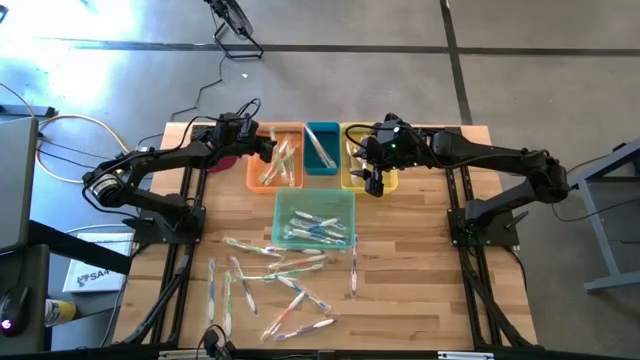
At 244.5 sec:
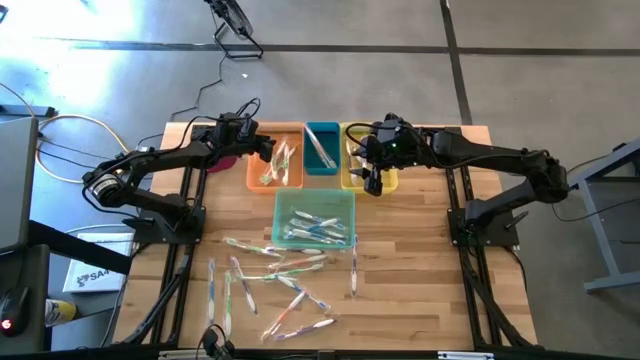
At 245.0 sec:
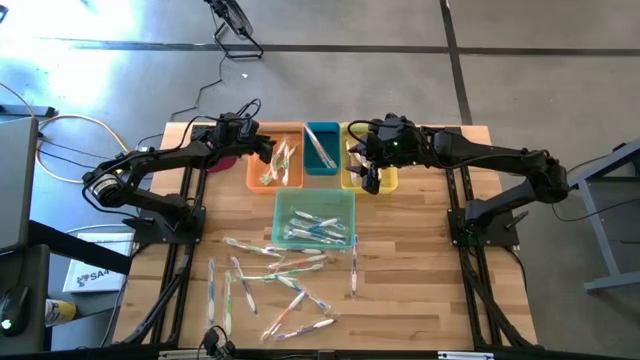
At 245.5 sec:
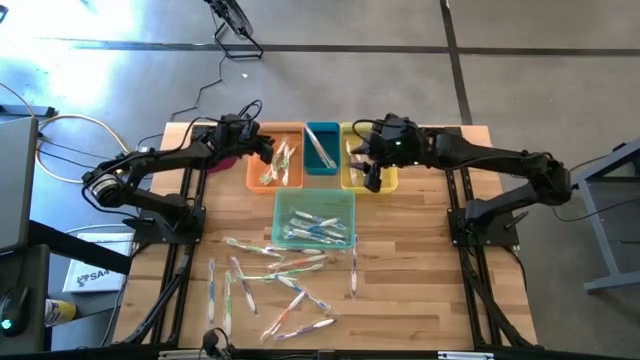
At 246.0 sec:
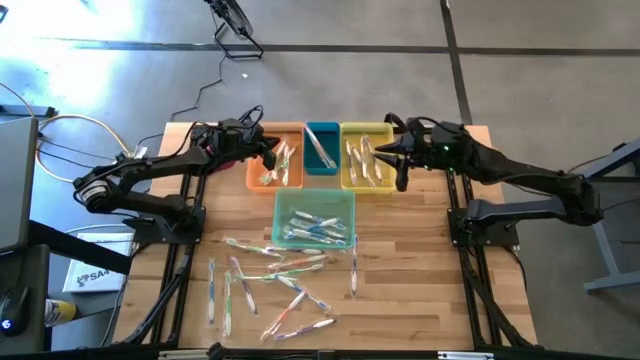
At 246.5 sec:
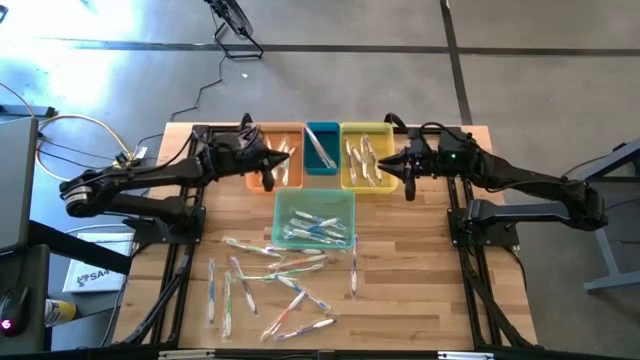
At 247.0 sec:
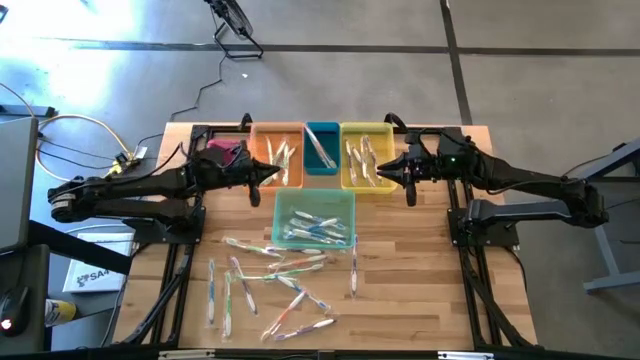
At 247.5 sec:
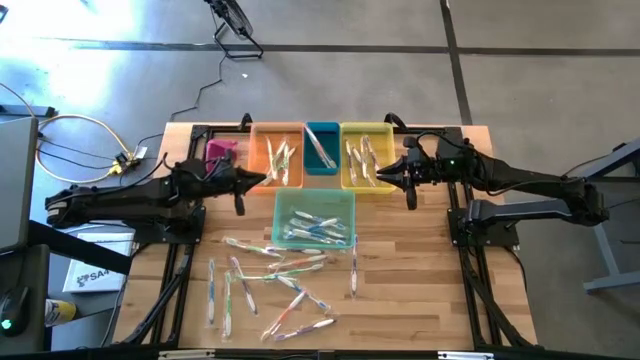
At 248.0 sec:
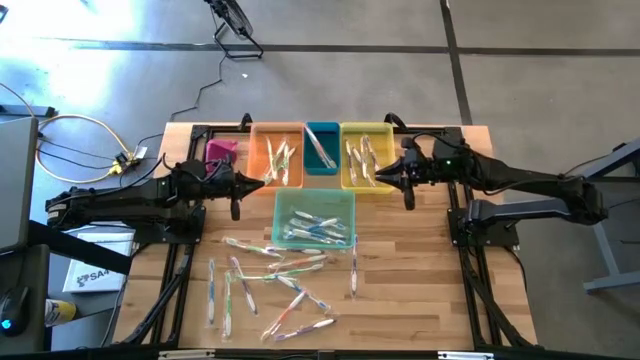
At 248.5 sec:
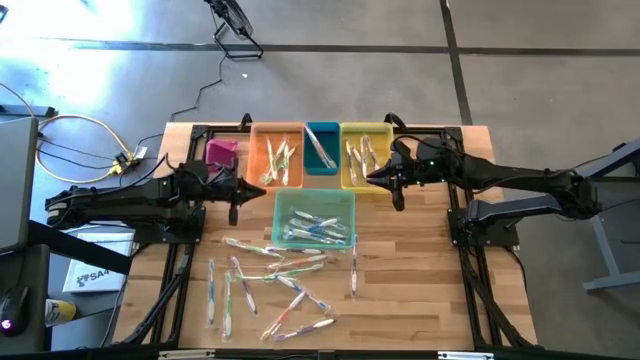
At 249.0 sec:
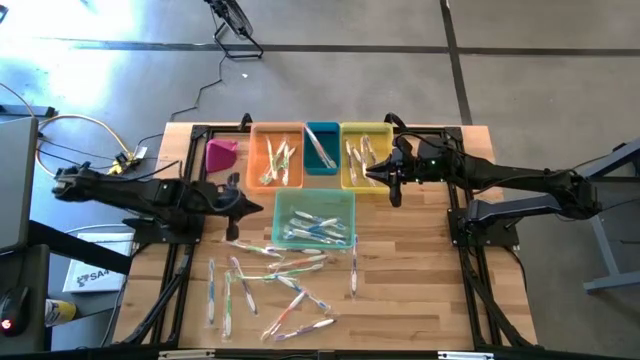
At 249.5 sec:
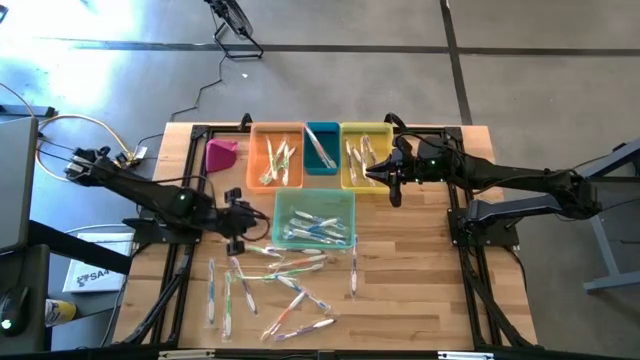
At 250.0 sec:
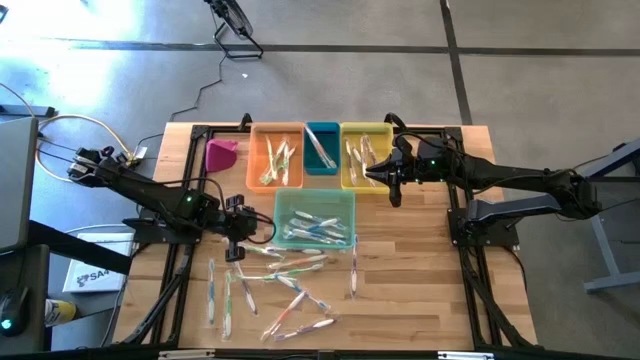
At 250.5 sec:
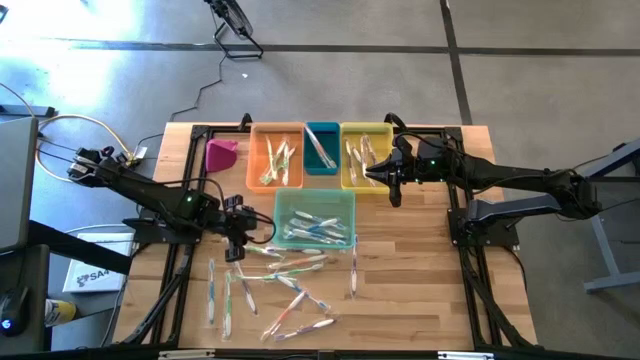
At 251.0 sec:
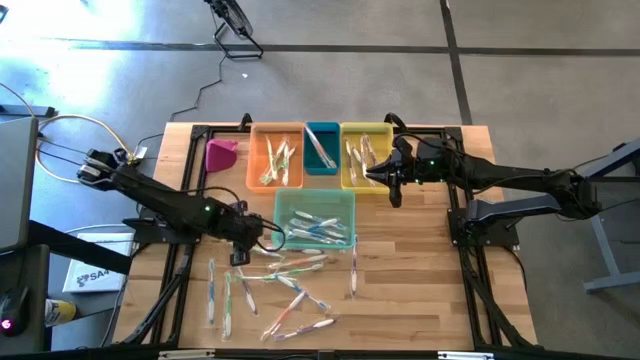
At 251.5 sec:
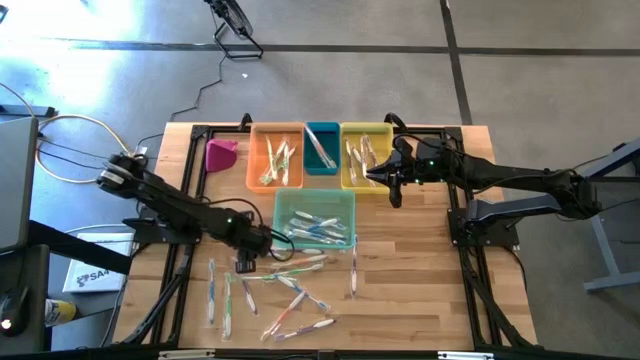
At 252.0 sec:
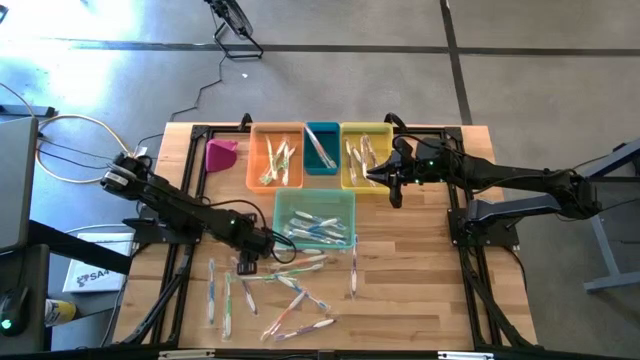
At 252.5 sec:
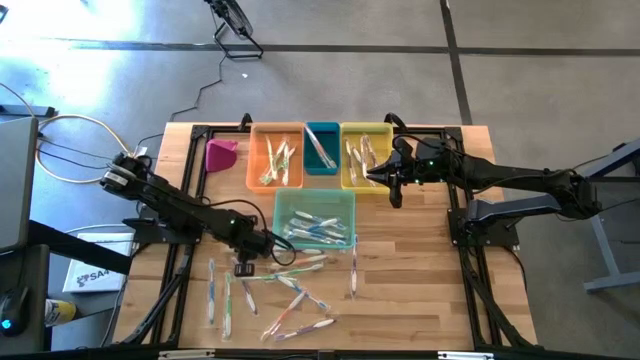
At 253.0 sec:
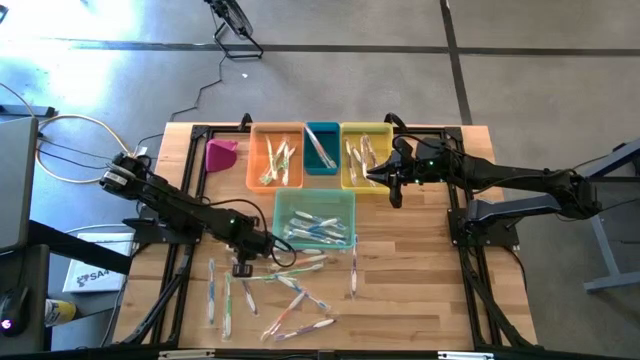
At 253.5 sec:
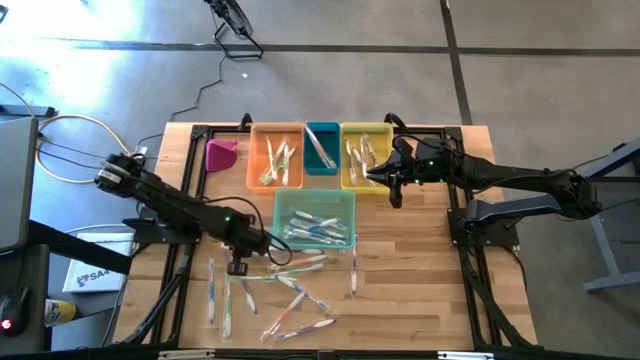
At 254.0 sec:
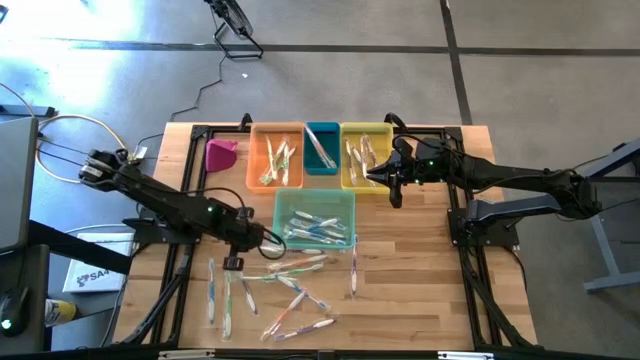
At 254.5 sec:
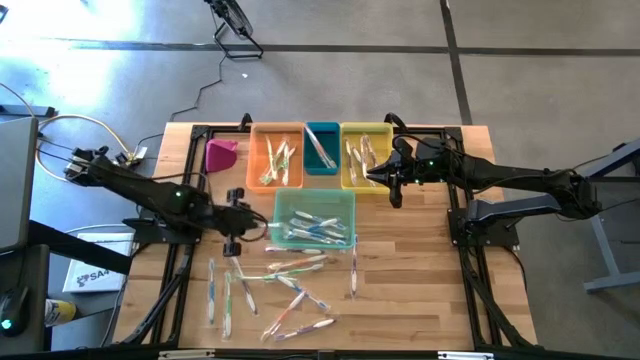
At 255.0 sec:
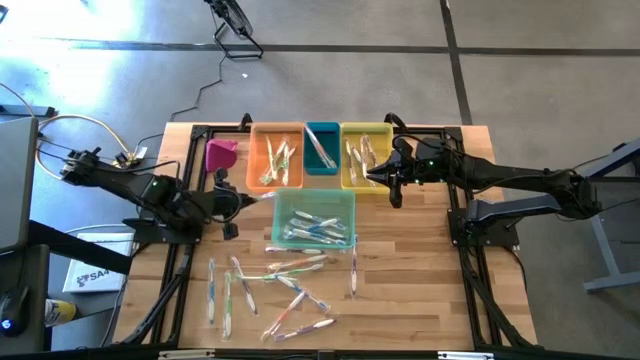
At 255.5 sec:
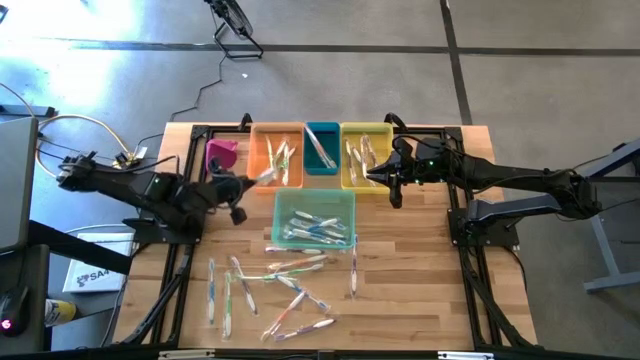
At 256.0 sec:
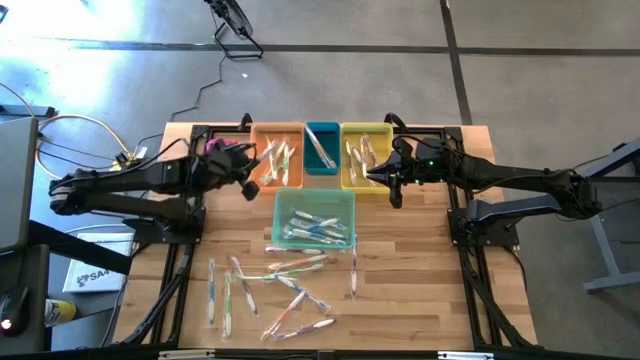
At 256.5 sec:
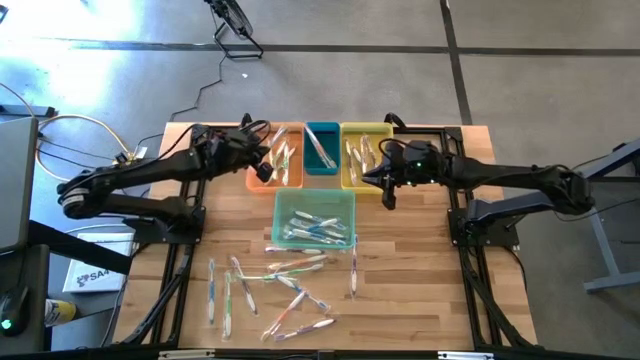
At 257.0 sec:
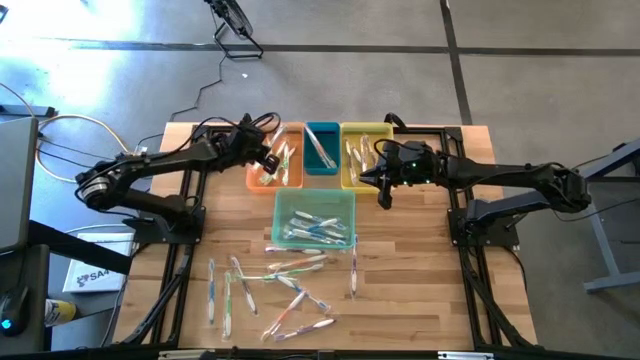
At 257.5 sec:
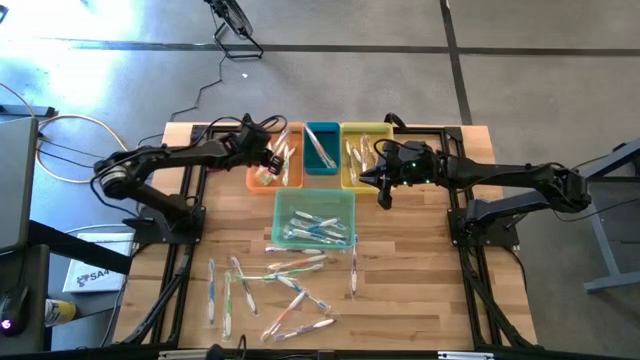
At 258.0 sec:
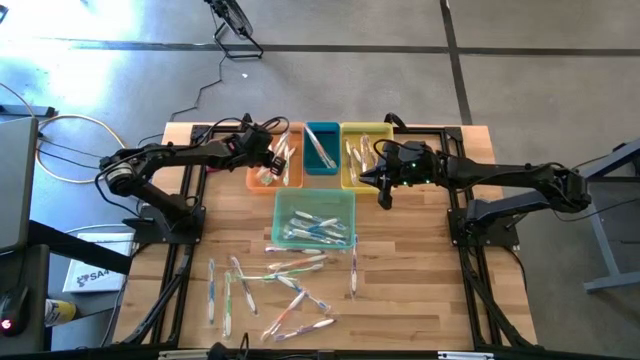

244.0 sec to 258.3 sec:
Task: Pick & Place Toothbrushes
Put the green toothbrush into the orange bin
